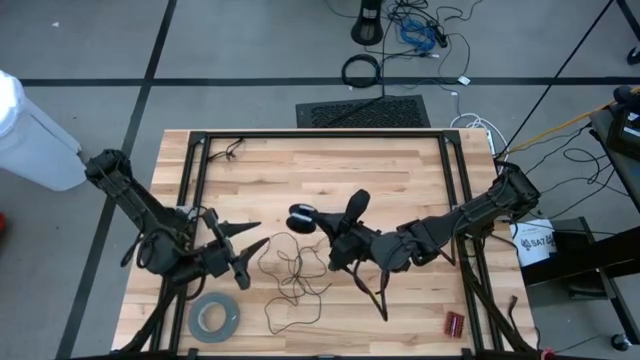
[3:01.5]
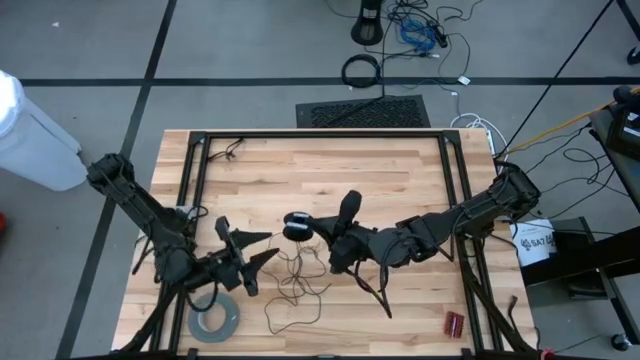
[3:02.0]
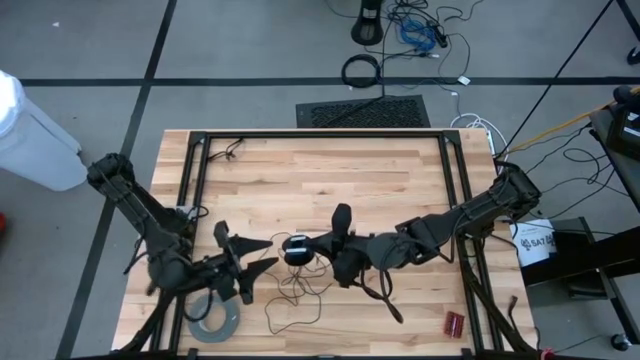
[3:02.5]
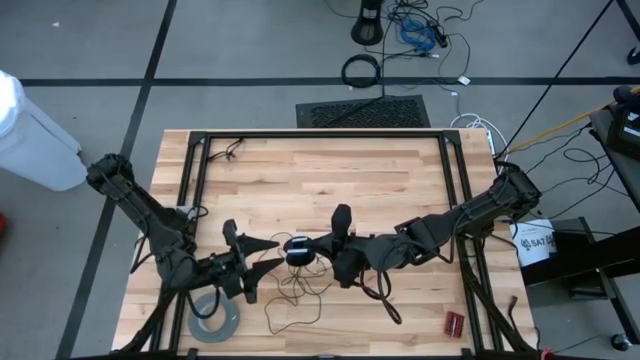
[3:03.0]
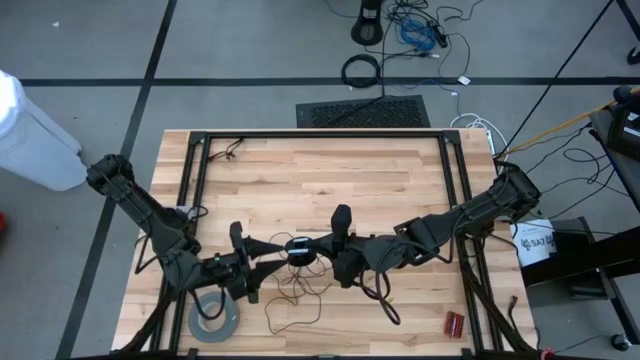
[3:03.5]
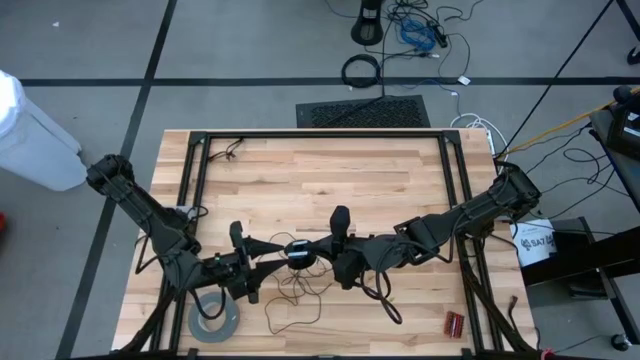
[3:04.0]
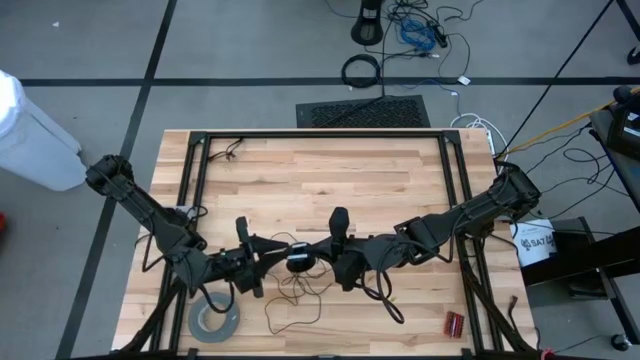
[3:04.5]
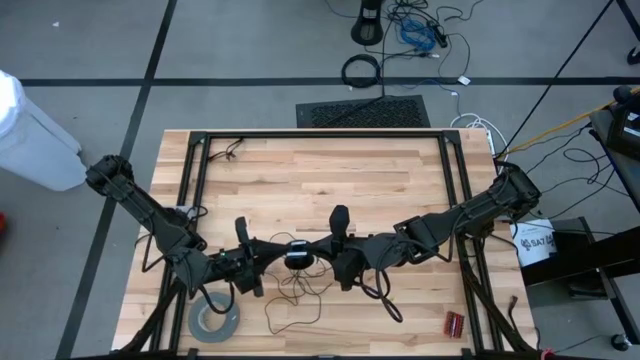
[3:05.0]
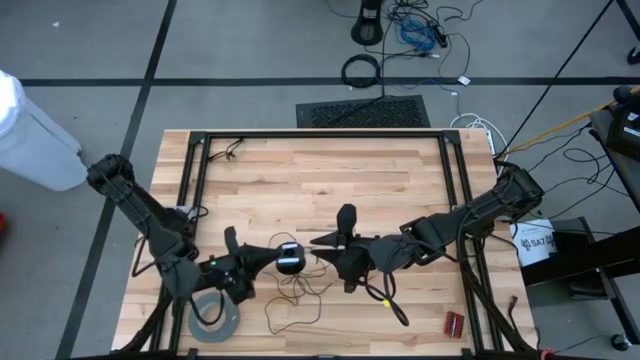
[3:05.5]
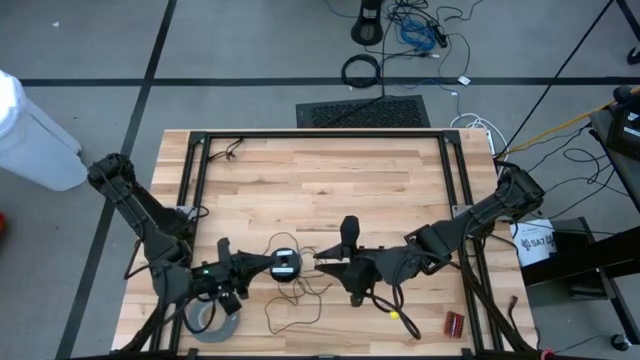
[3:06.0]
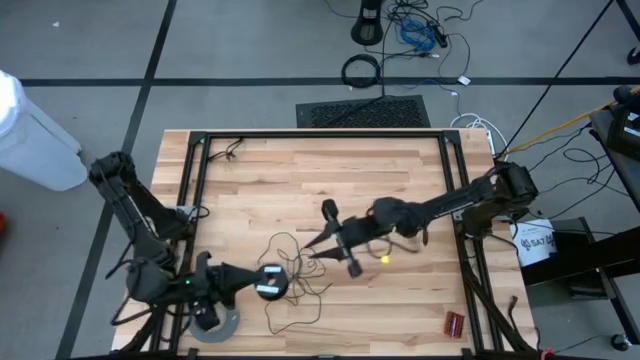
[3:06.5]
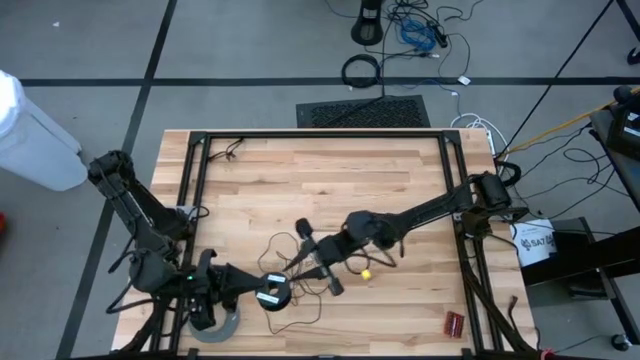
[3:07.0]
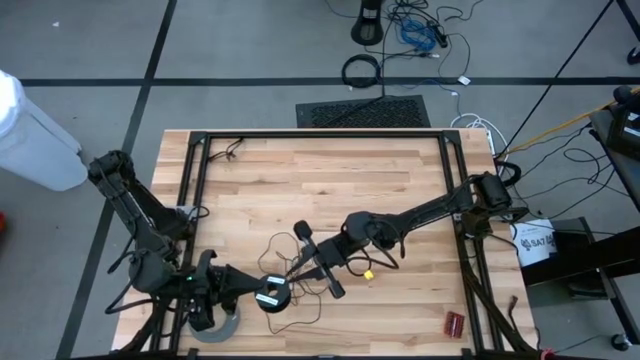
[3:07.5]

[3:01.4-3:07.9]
Task: Coil cords
Uncoil the black wire from the spool

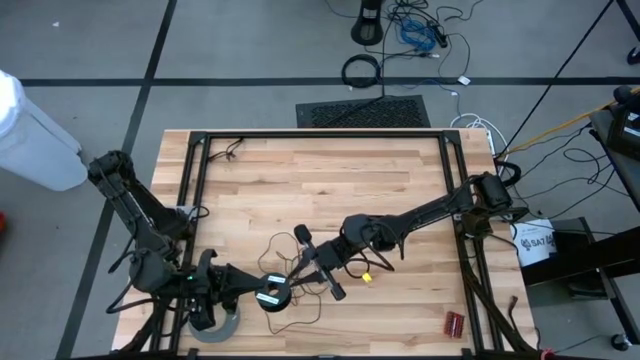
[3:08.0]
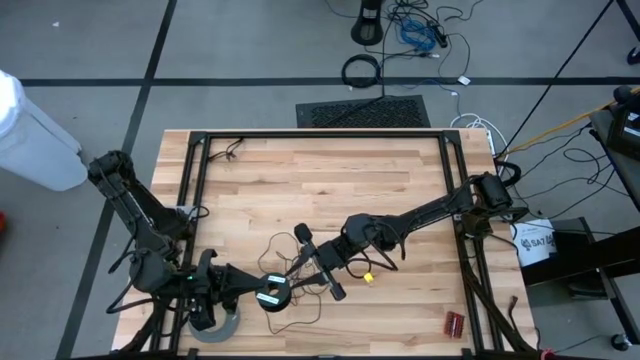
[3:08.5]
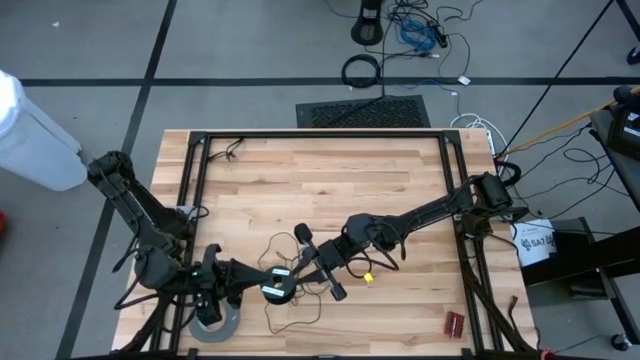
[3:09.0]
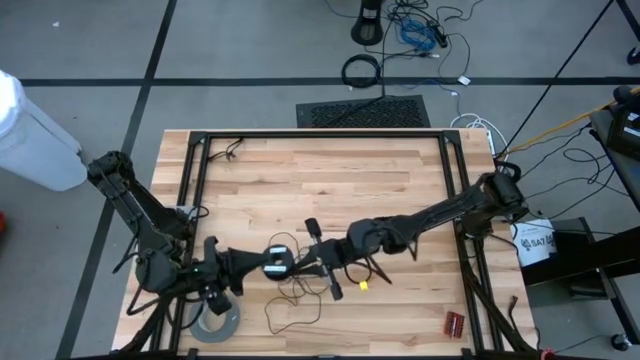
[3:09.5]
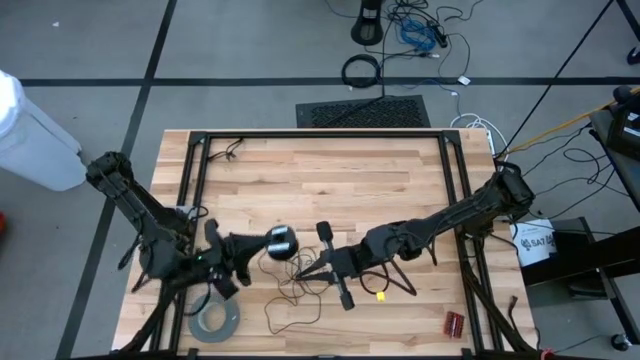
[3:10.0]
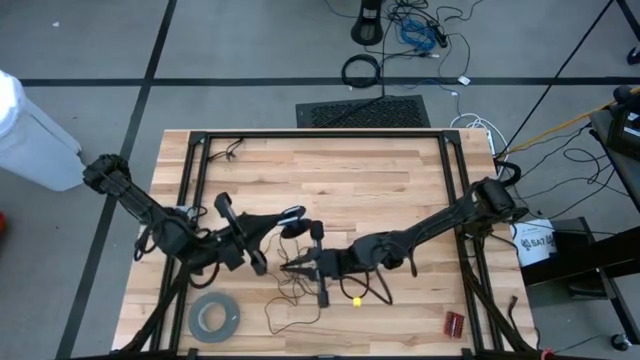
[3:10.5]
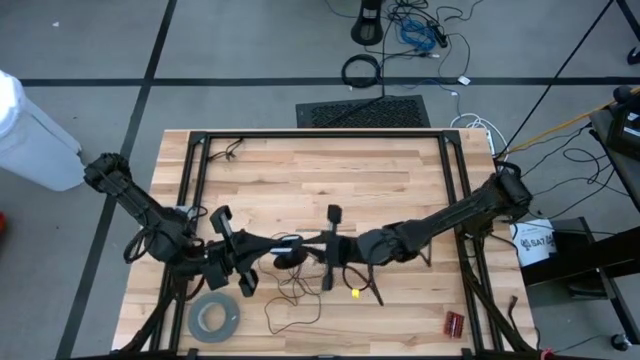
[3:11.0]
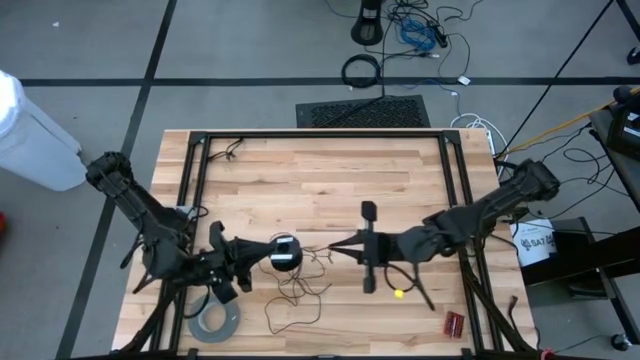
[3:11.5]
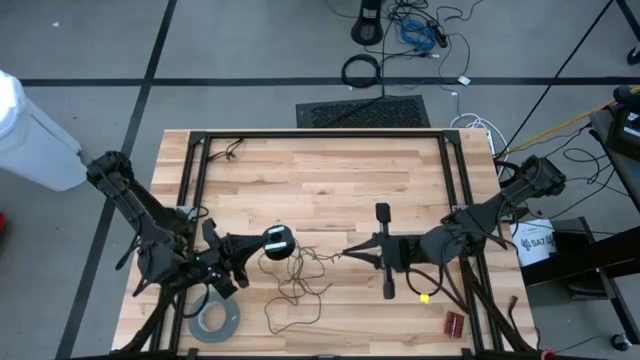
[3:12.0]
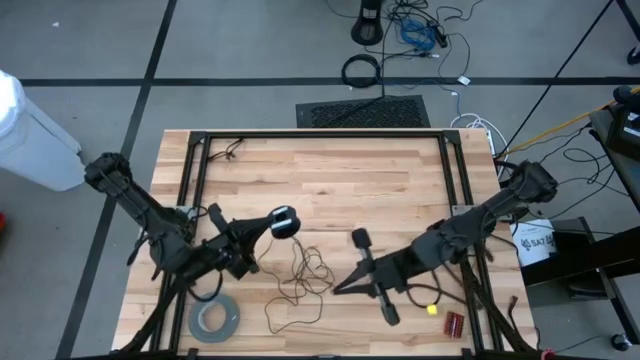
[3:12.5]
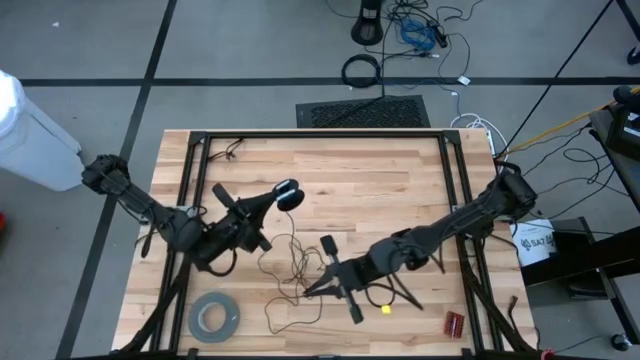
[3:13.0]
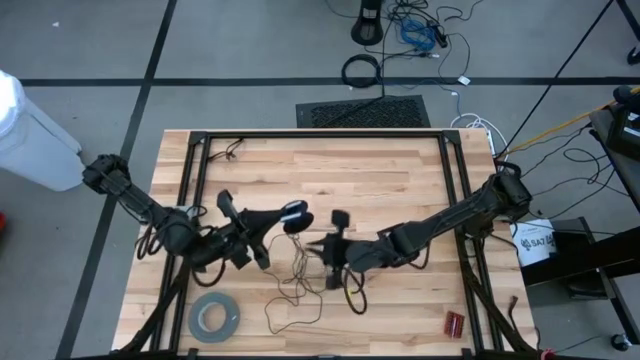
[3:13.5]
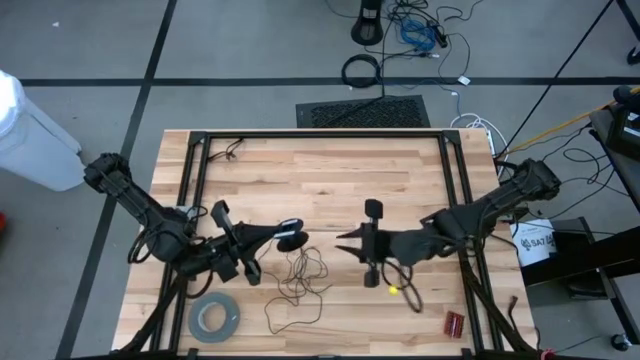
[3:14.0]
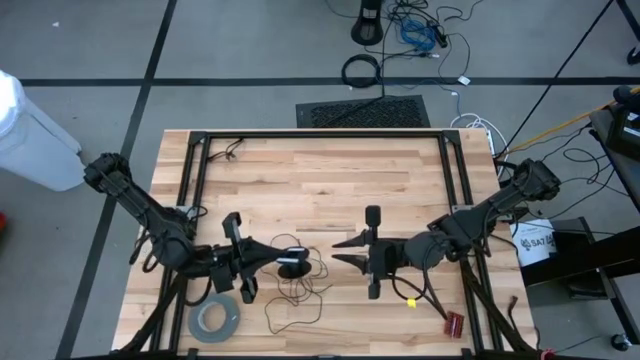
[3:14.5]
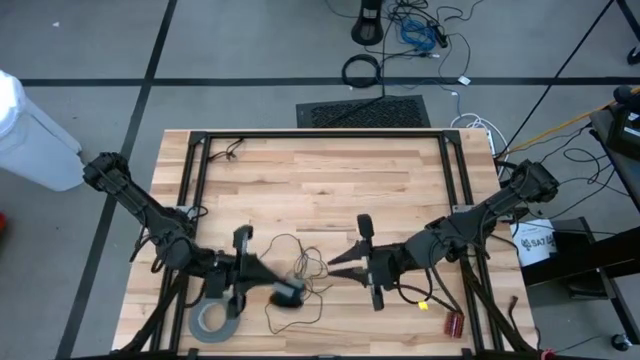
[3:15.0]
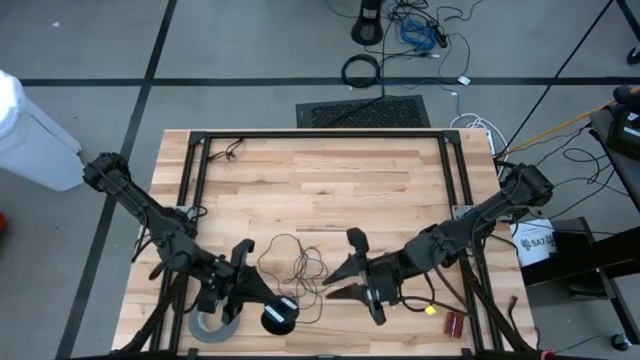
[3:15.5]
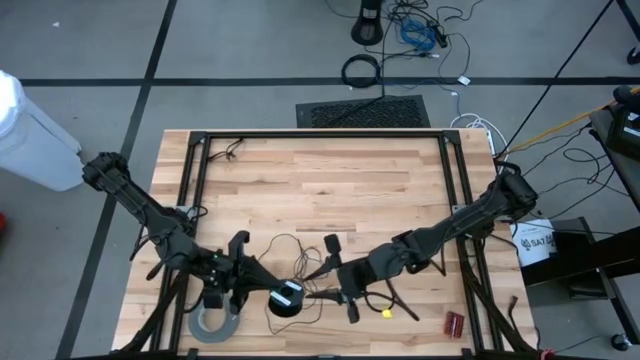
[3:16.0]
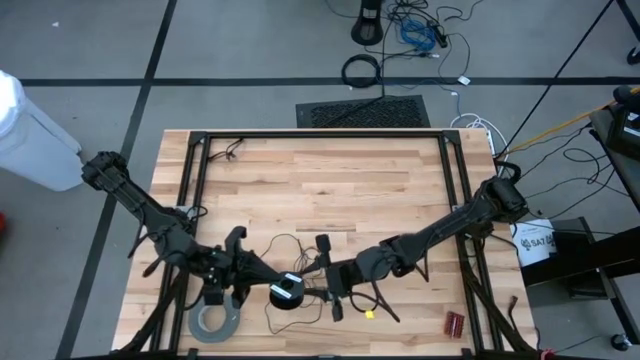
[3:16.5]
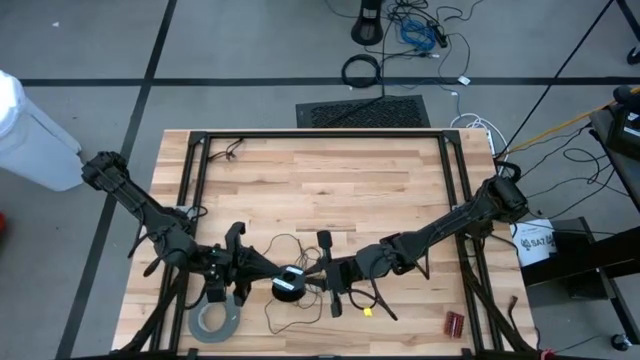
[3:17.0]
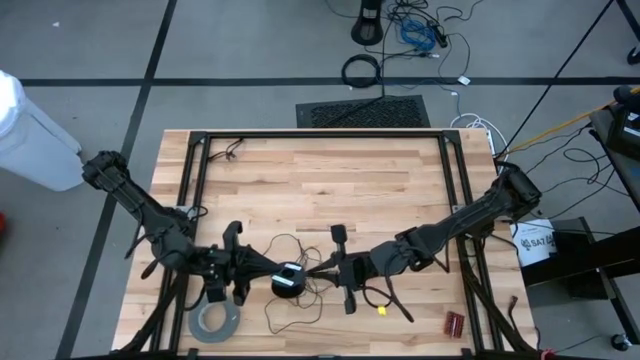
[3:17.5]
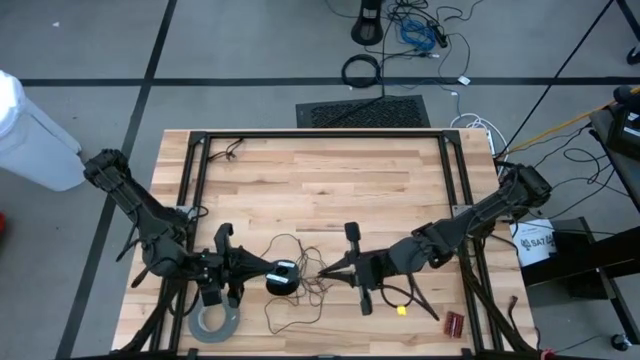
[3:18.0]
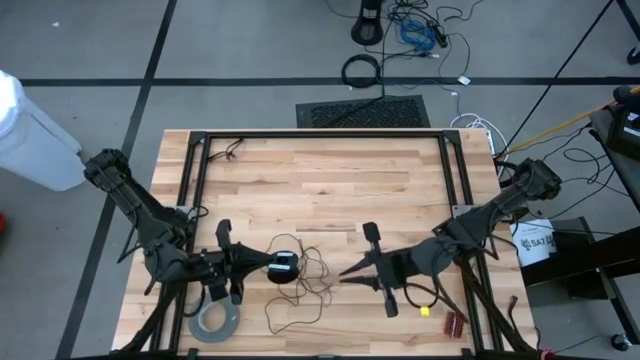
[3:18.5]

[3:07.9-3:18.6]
Uncoil the black wire from the spool
